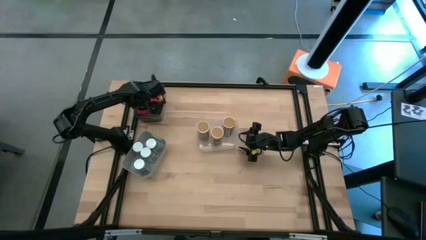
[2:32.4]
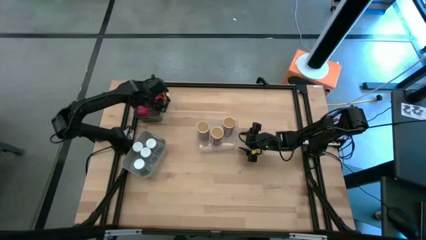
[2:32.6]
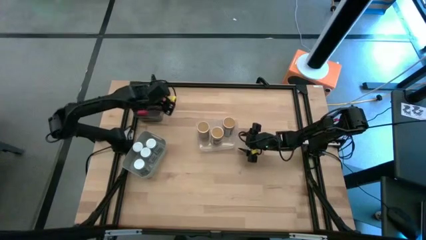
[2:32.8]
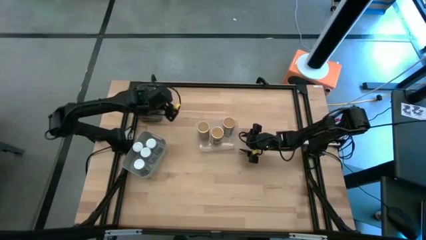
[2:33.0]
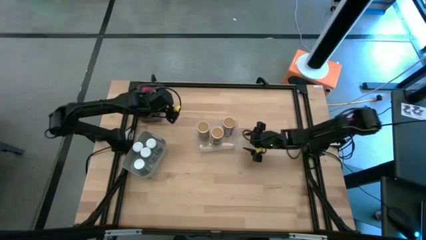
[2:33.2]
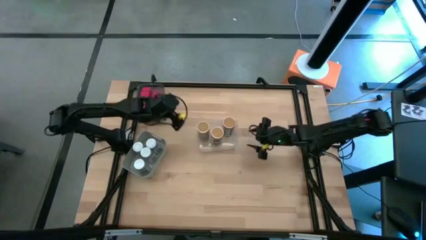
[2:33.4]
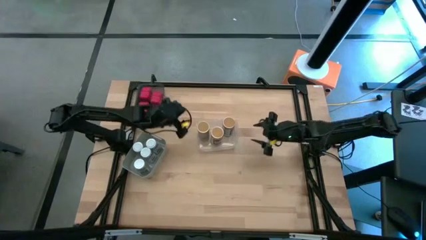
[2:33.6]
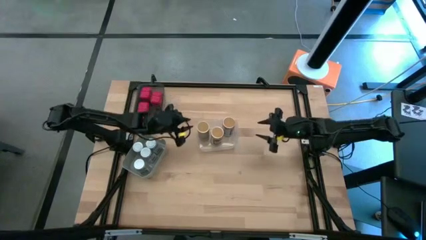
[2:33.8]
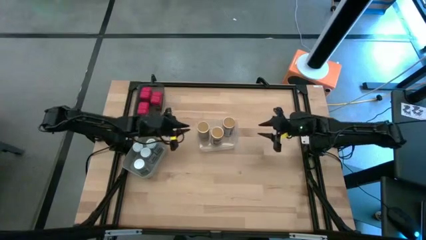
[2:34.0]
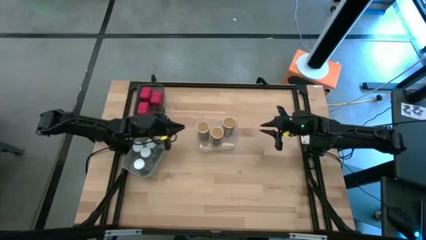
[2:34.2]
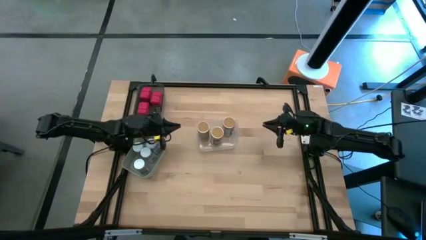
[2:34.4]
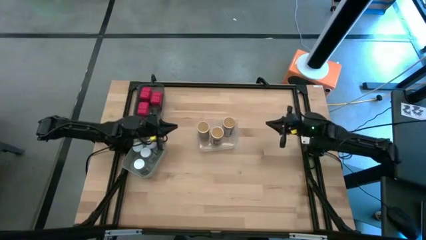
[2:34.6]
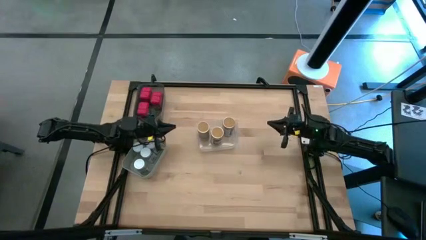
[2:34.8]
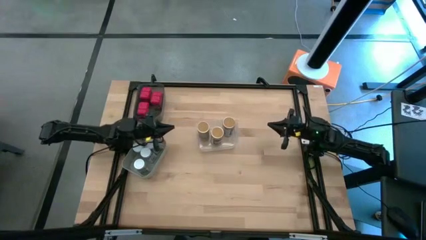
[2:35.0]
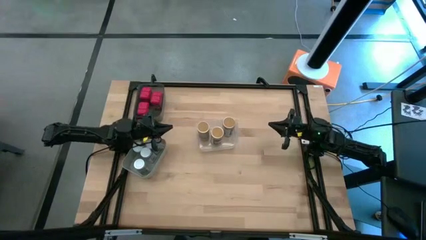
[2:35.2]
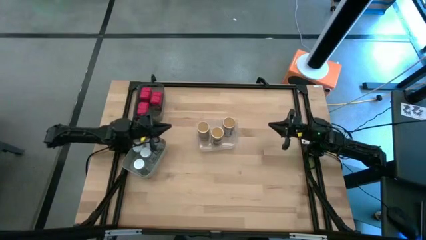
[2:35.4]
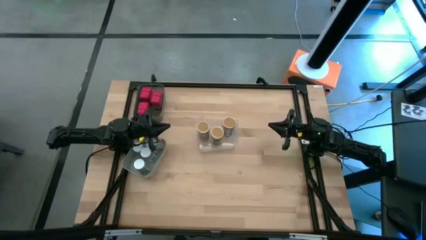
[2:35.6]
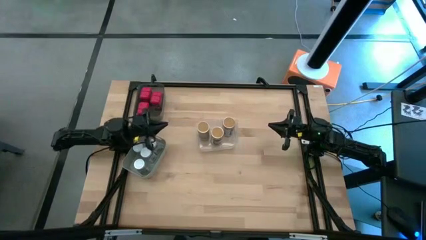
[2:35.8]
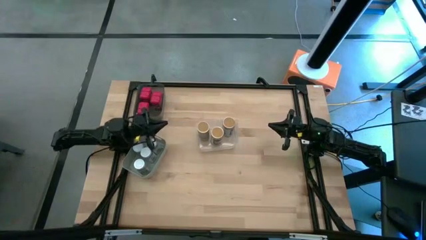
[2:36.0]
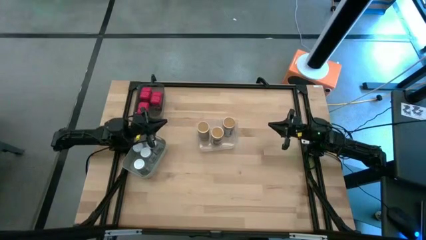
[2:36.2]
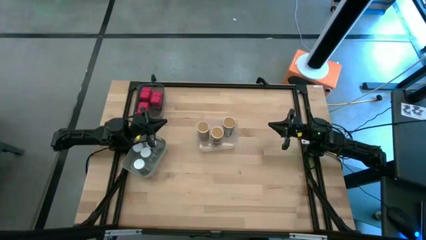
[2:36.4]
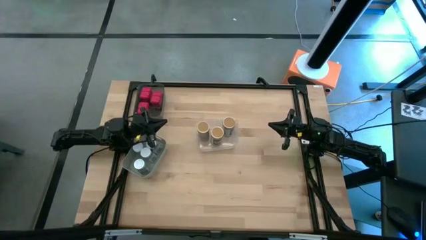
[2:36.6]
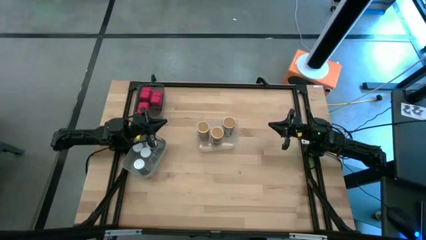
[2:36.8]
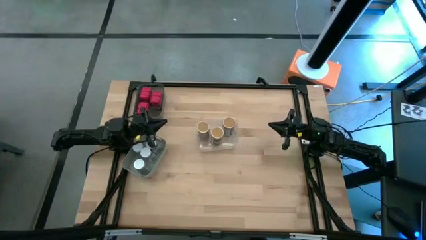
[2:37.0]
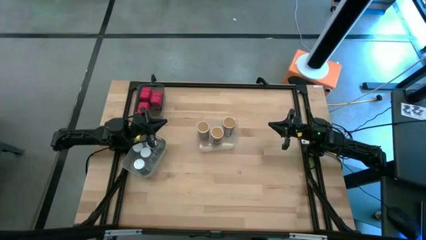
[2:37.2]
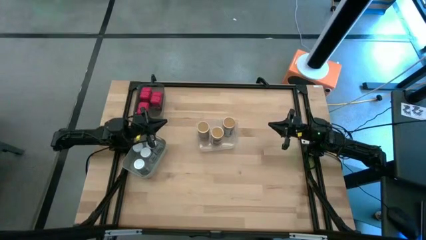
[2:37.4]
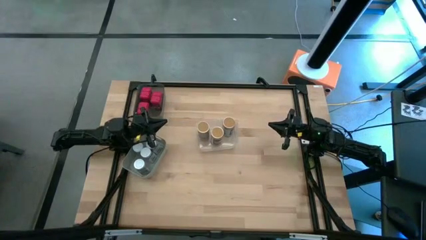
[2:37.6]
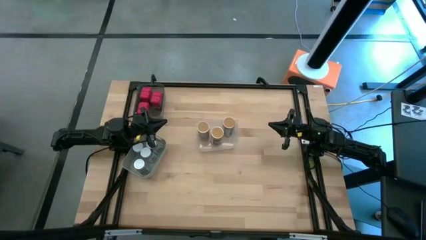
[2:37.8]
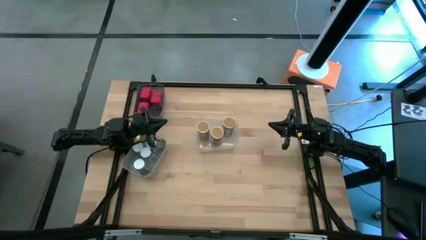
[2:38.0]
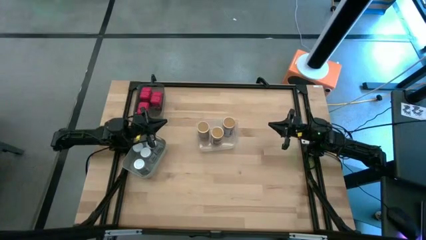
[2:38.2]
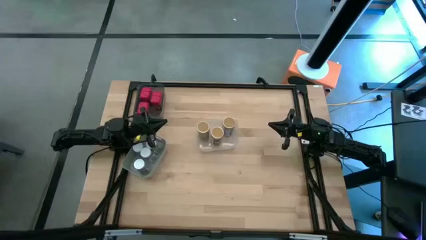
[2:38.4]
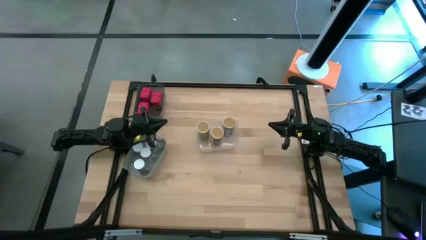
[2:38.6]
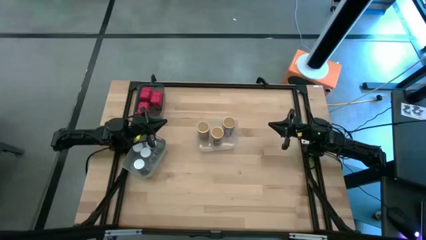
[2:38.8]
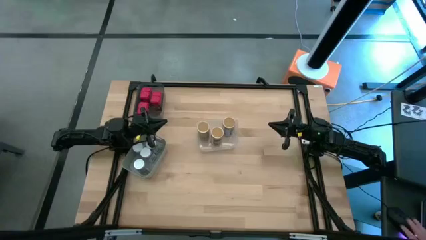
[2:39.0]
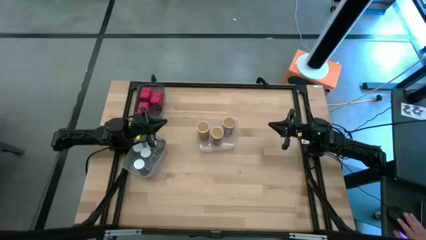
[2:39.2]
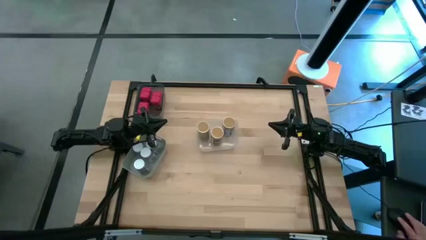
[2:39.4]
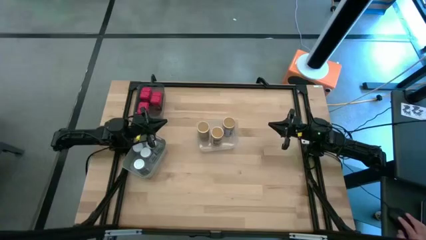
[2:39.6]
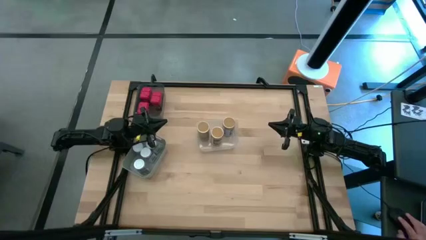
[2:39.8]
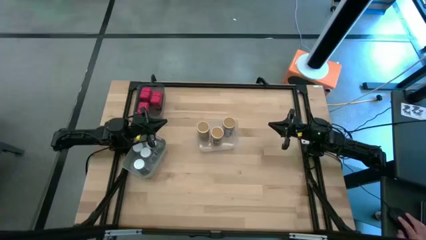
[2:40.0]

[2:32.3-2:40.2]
Task: Sort spices by type
Return to Home Position

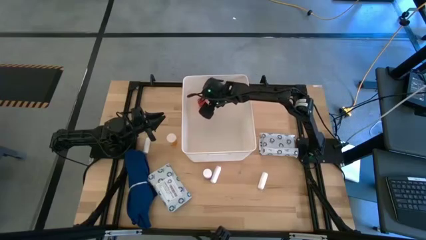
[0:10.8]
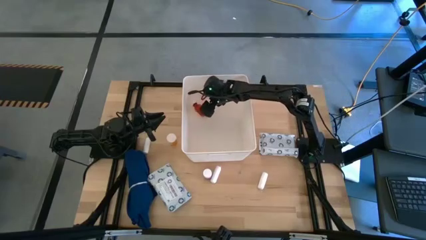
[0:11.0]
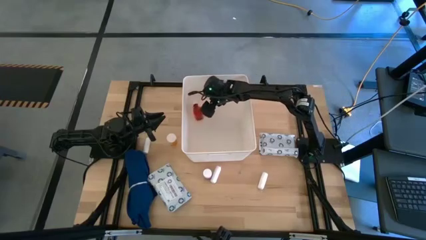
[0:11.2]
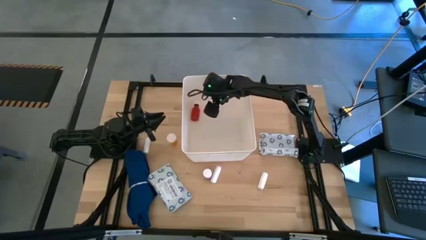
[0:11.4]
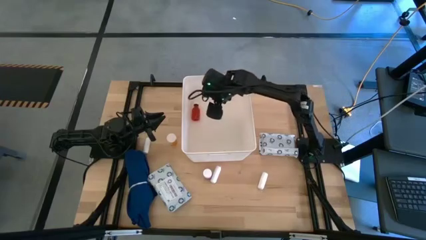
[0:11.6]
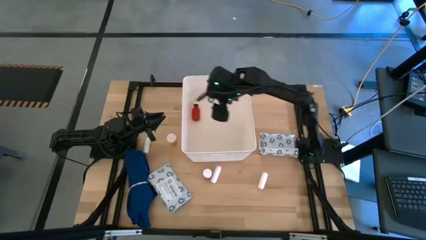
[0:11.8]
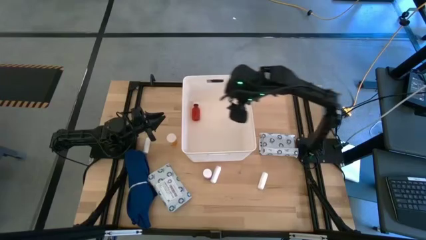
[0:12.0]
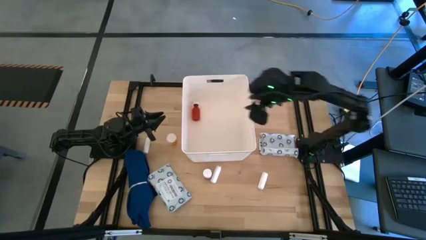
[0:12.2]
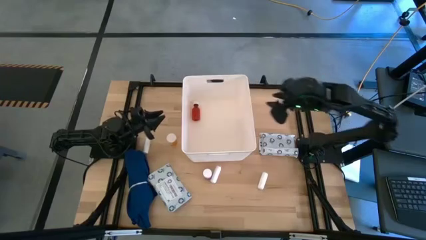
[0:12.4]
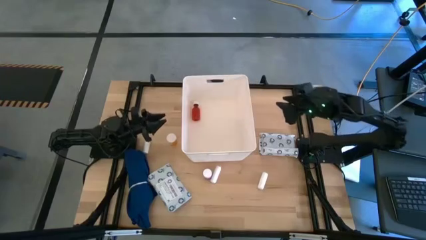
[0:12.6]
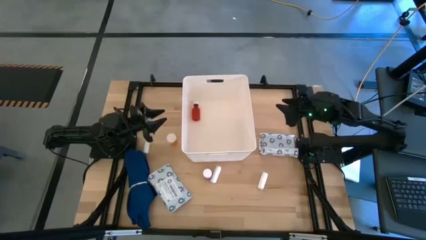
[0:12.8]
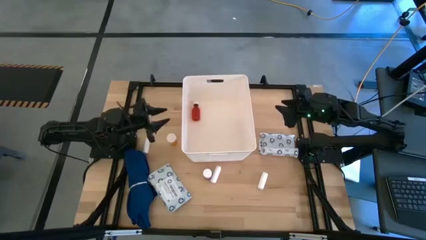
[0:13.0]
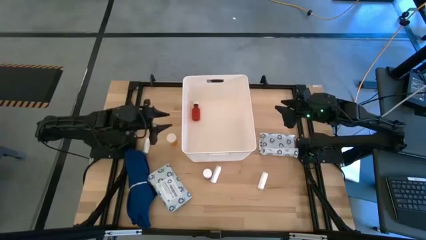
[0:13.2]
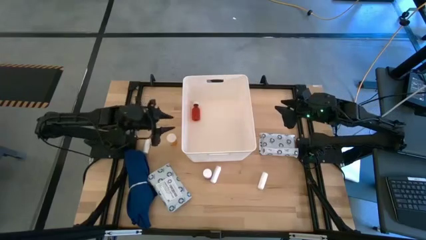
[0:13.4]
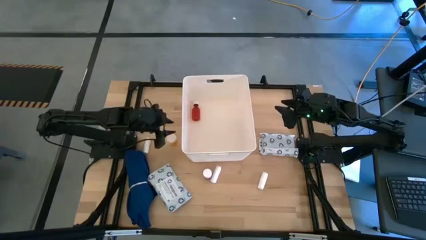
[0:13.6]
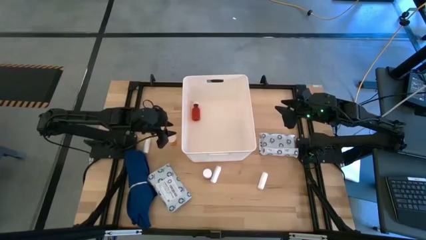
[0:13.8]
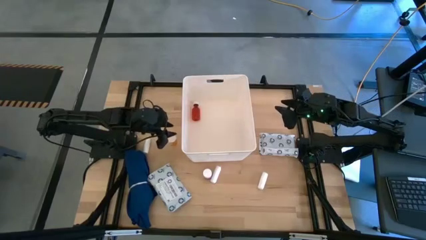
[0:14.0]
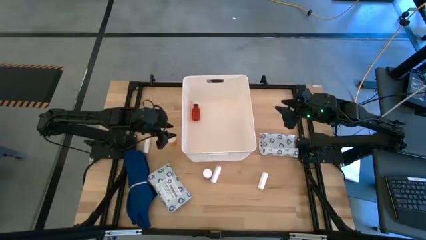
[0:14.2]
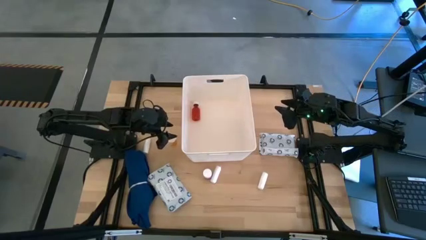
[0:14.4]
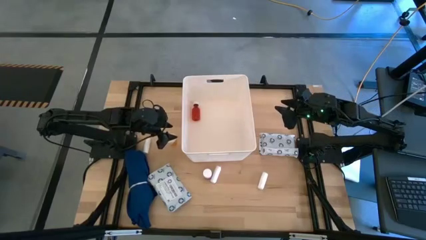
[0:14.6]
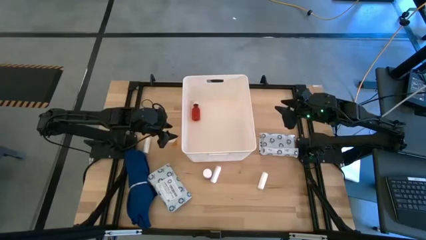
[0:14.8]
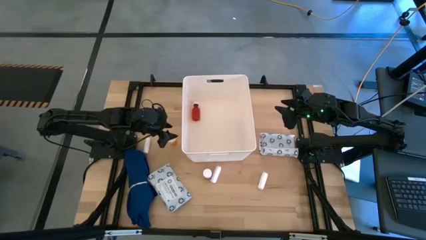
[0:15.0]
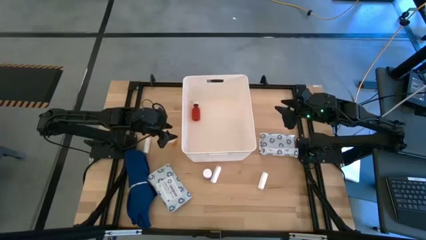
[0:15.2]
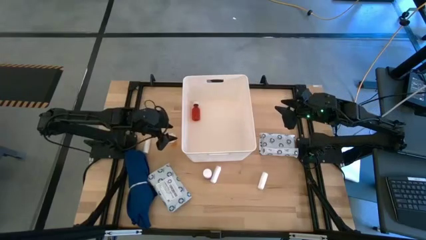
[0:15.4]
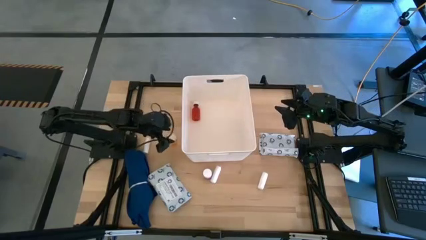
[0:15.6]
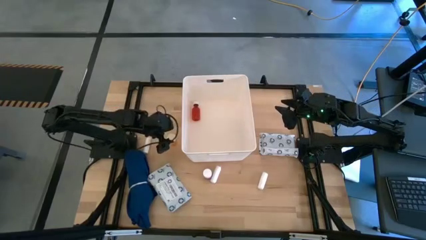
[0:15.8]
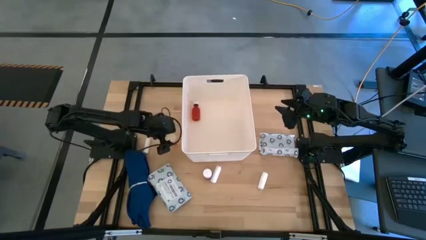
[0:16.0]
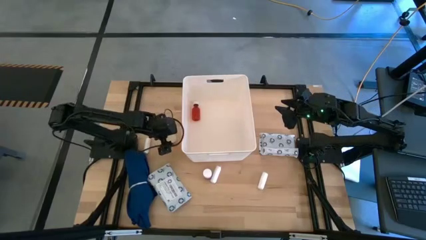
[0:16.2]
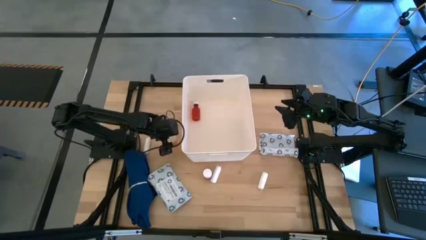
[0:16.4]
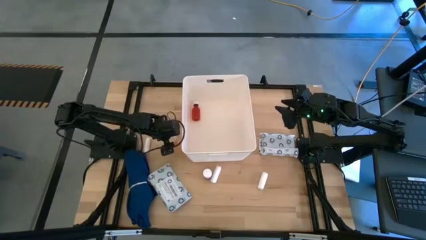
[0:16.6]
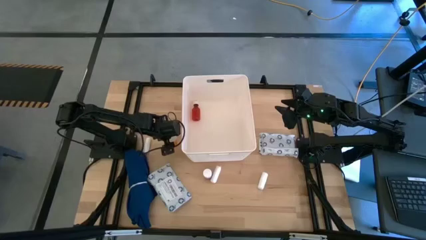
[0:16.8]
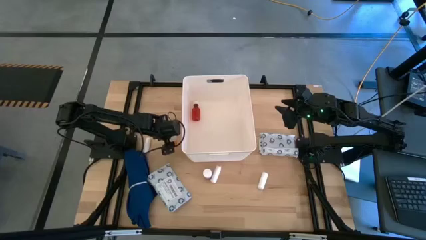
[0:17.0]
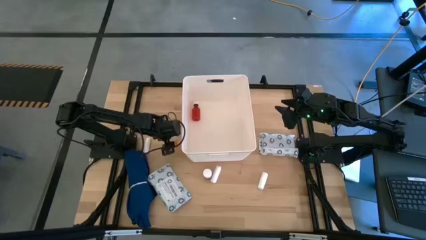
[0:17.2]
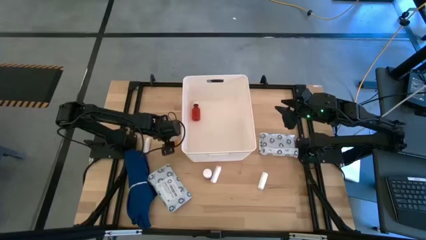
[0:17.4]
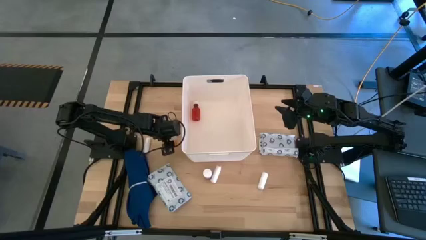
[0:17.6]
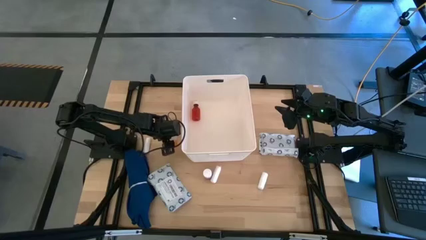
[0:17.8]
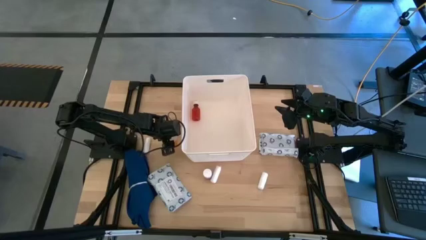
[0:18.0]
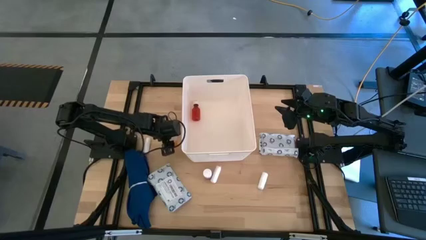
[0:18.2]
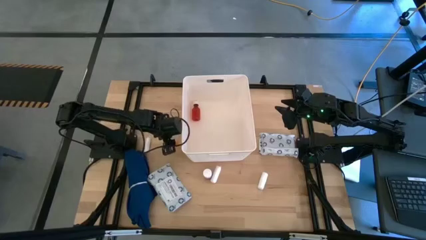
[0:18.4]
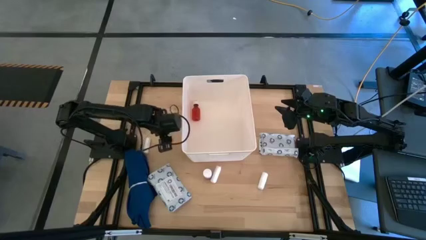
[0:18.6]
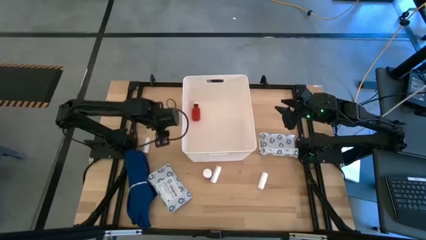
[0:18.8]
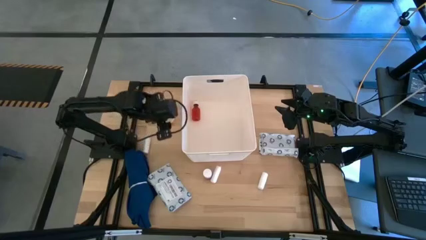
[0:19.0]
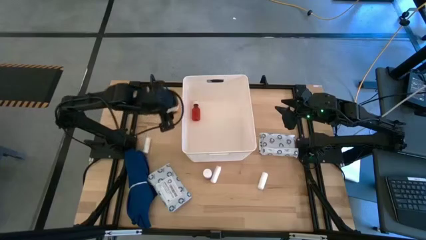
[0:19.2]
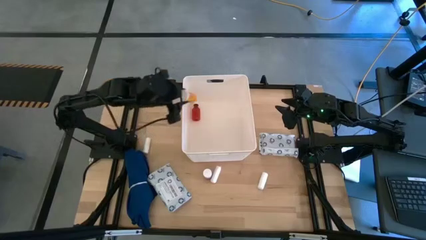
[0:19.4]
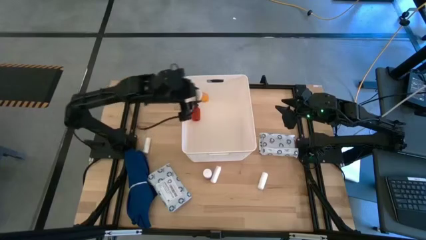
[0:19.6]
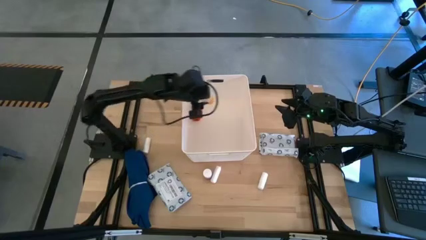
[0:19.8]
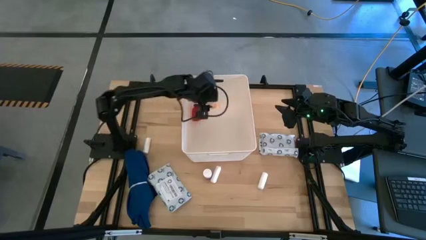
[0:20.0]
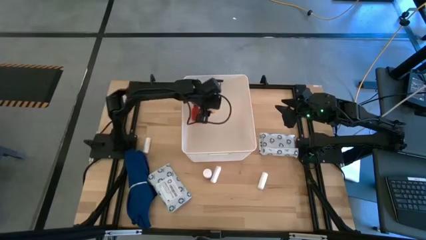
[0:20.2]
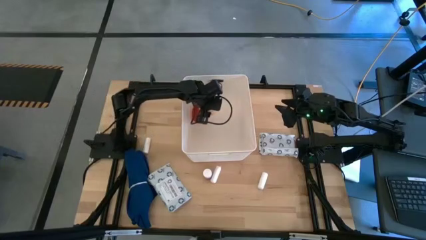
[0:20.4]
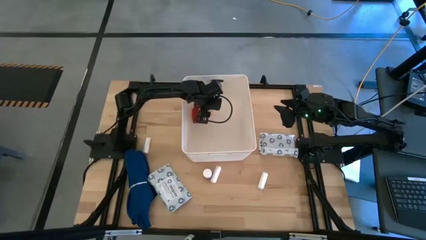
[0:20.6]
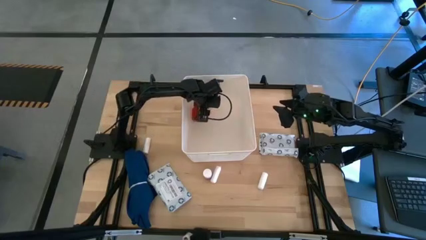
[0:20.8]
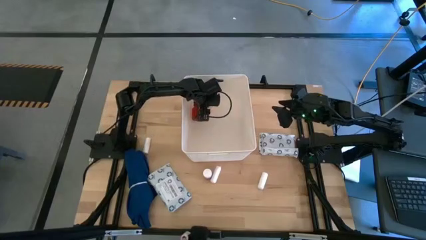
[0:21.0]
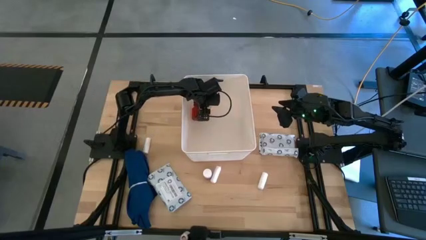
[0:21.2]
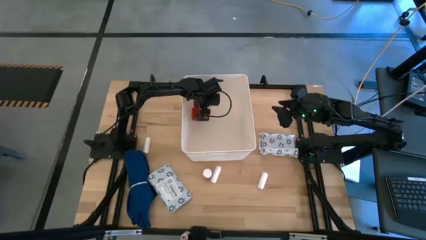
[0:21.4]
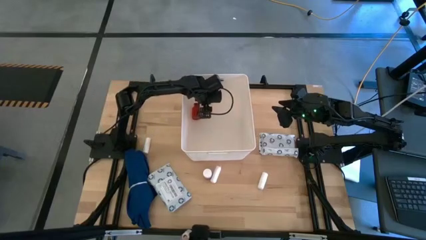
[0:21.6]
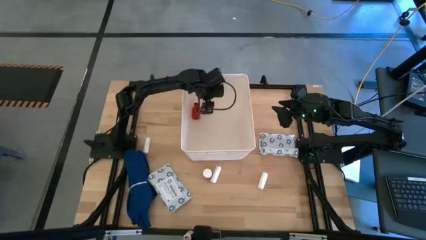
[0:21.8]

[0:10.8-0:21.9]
Task: Pick & place medical supplies in basket/bin
Put the transparent orange pill bottle into the white bin
